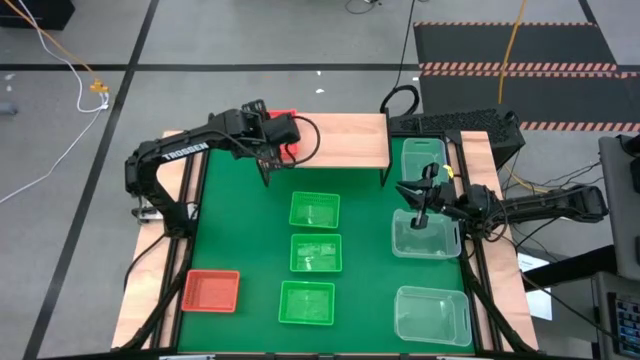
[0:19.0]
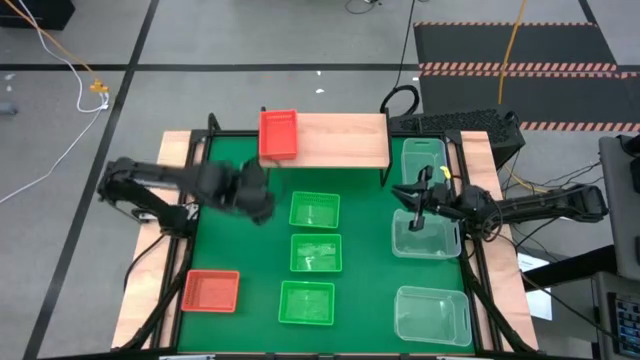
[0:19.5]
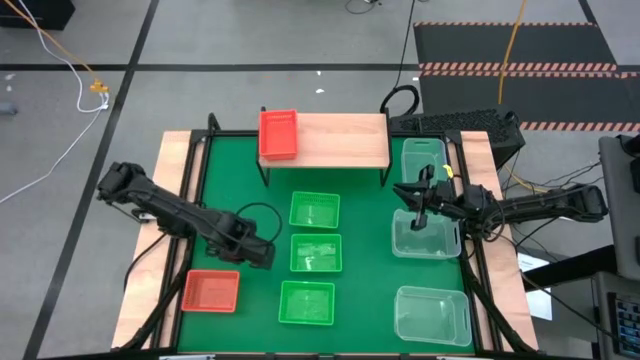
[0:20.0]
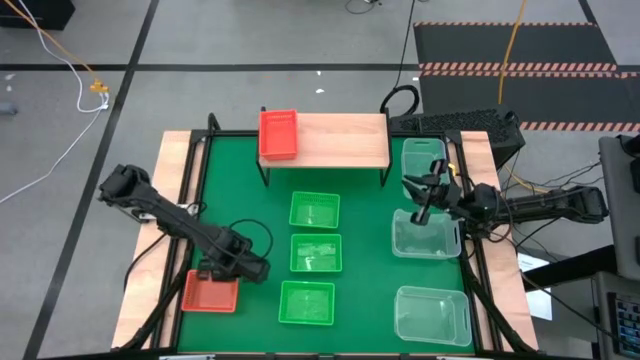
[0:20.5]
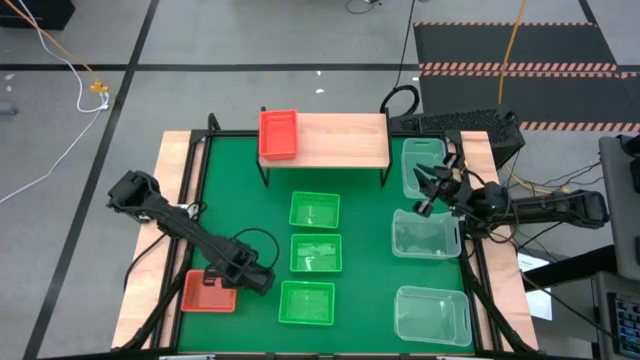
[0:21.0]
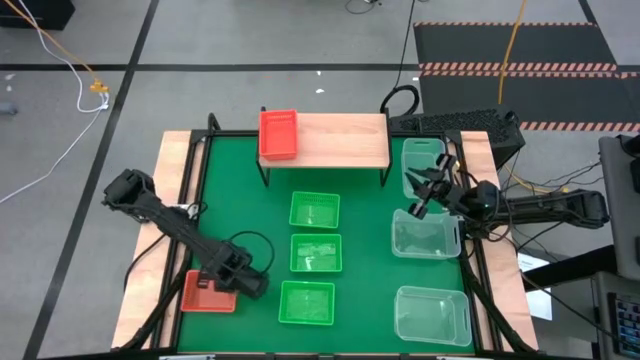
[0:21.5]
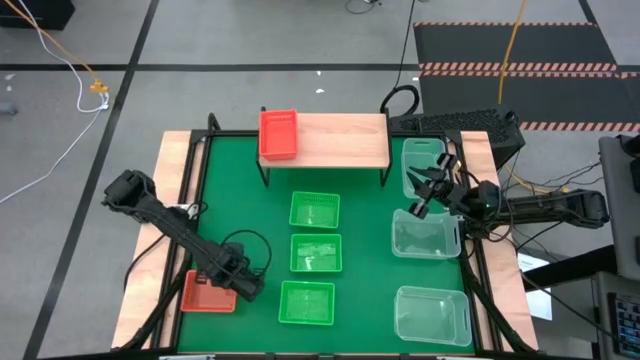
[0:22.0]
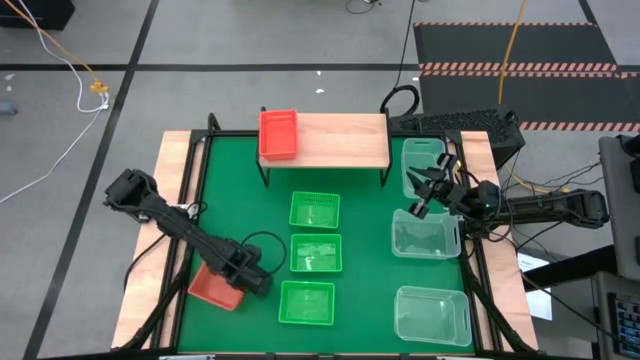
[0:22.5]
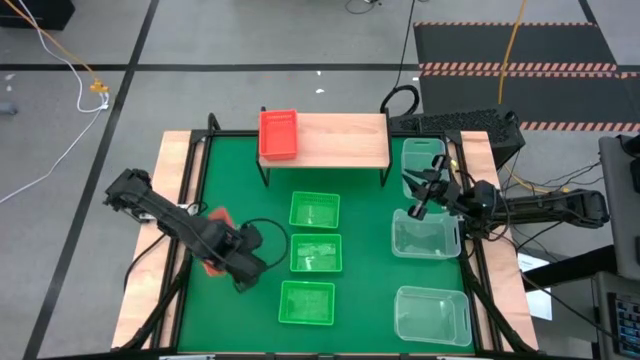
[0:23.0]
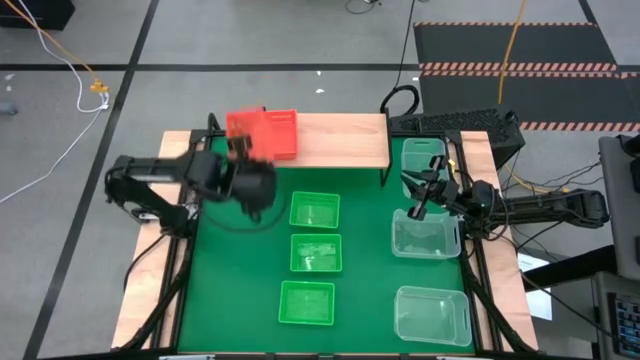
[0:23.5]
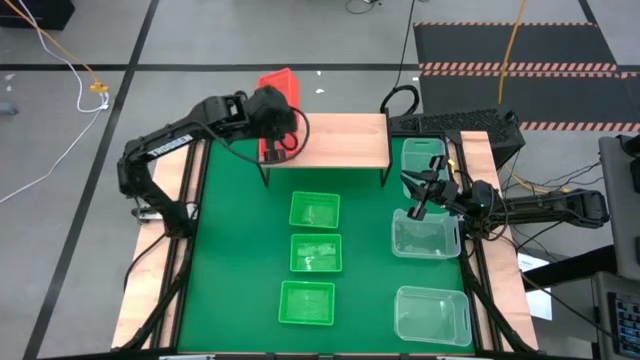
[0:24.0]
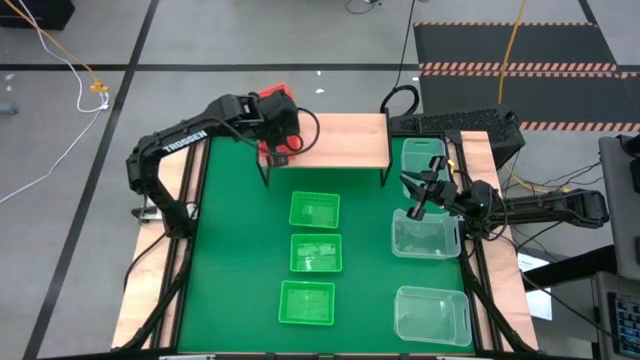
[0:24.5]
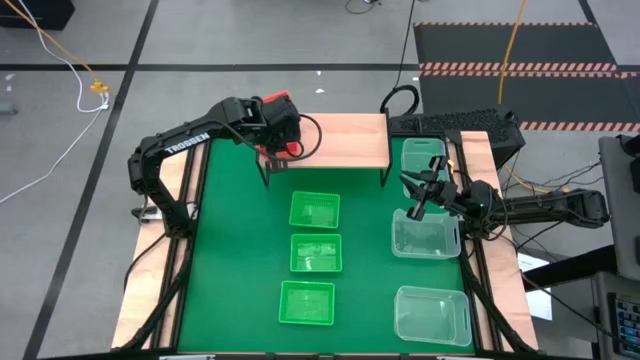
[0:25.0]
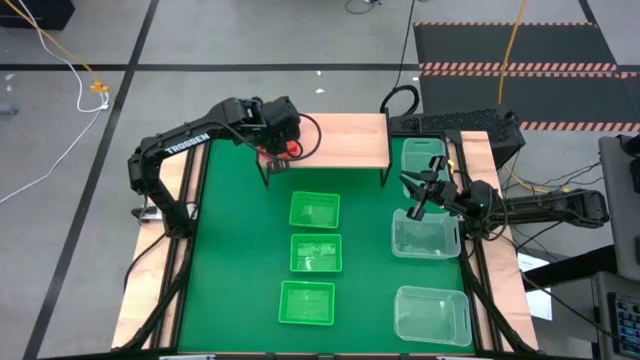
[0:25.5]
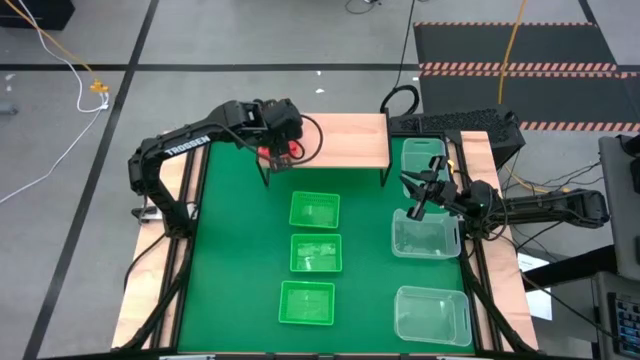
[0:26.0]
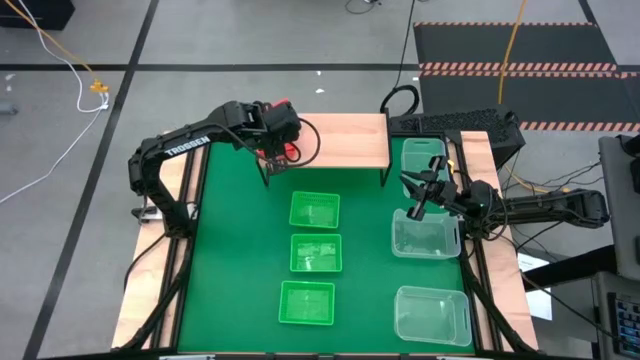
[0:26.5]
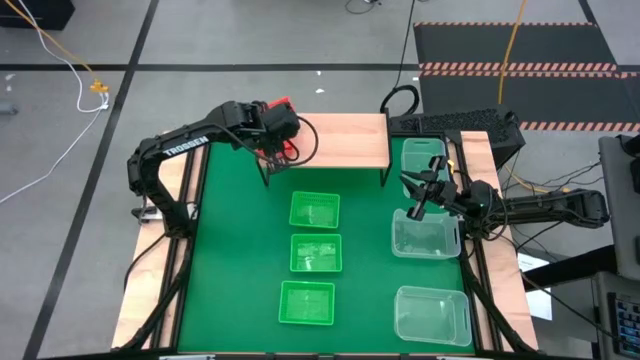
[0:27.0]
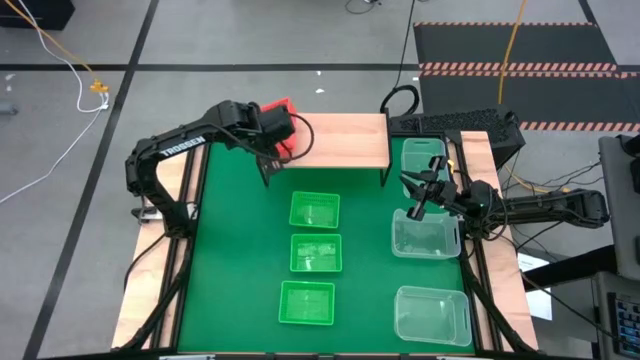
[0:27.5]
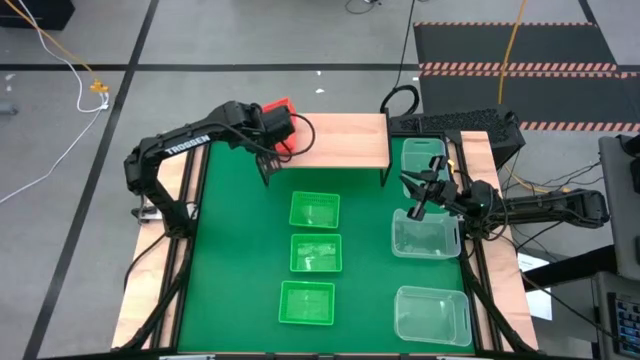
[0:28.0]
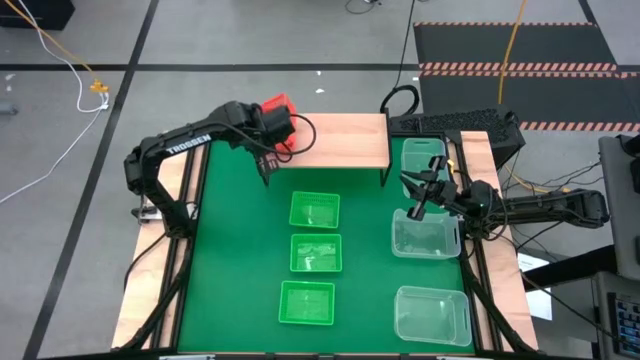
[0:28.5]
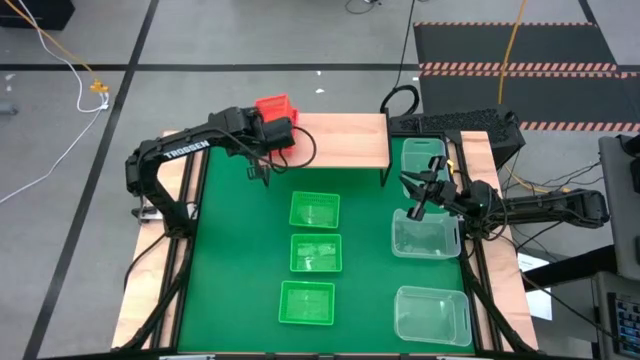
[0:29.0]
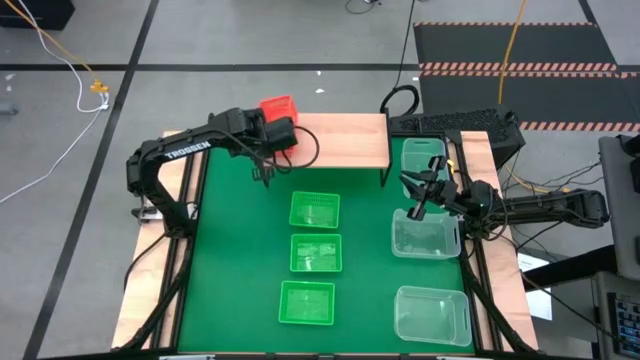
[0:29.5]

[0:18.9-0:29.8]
Task: Stack baskets on shelf by color
Stack the orange bin on the orange bin on the shelf

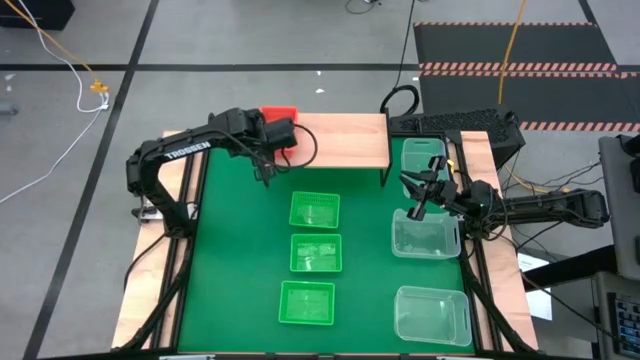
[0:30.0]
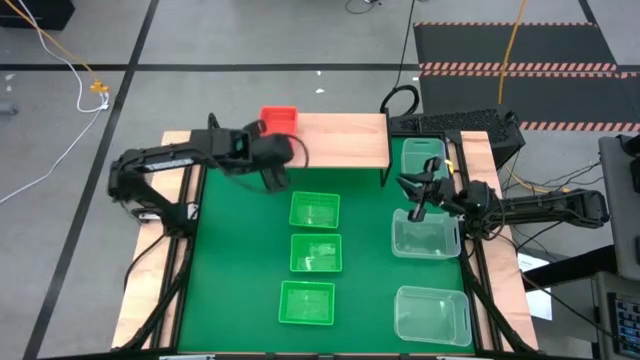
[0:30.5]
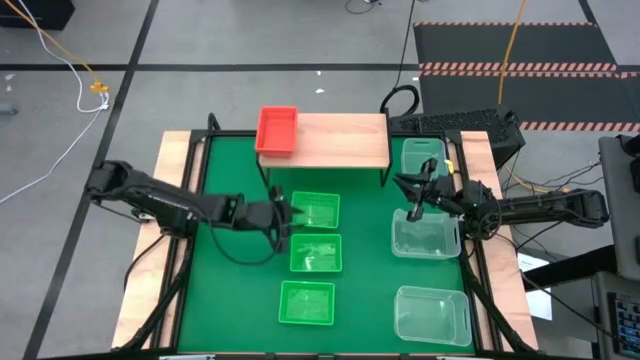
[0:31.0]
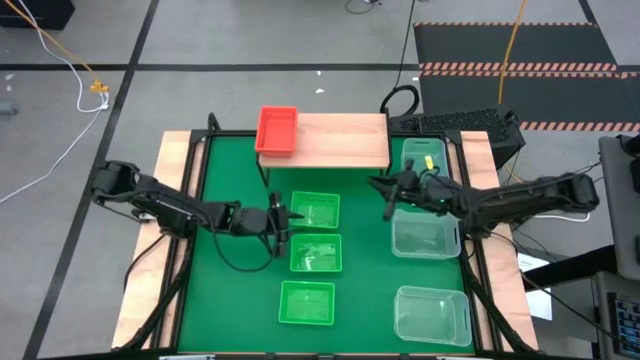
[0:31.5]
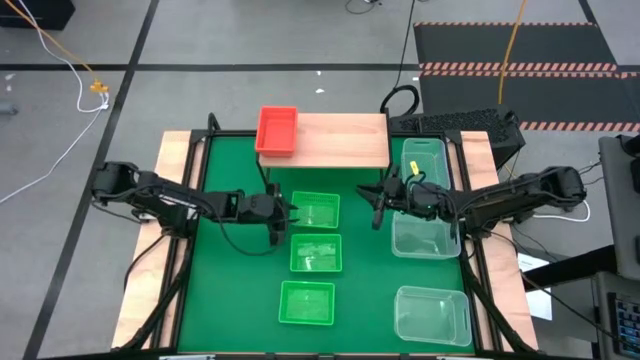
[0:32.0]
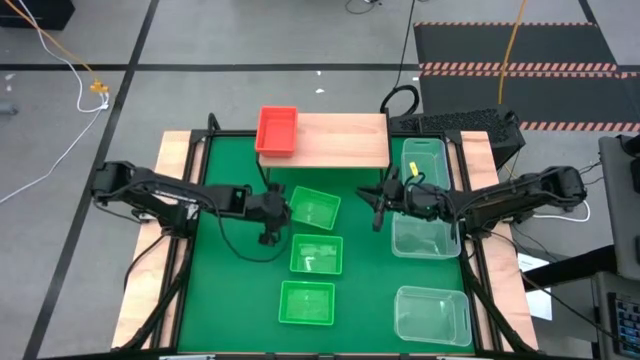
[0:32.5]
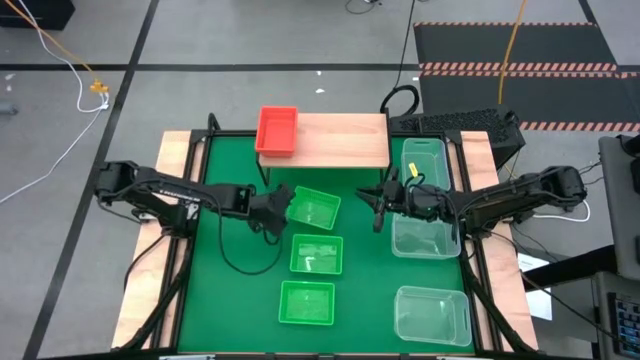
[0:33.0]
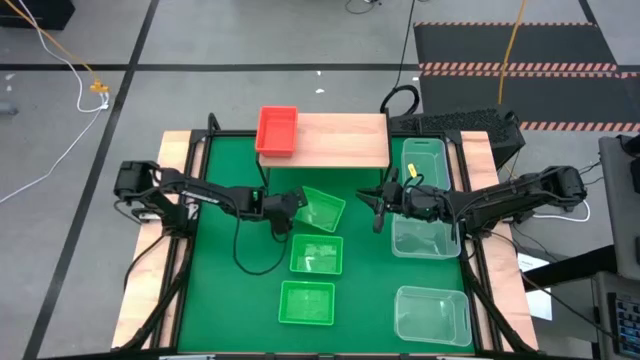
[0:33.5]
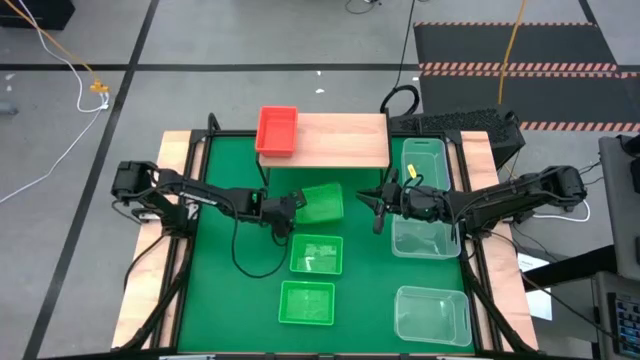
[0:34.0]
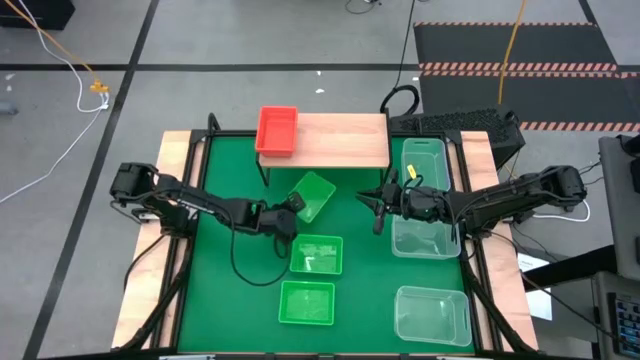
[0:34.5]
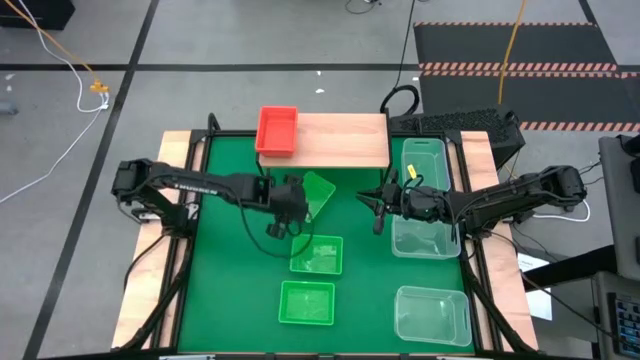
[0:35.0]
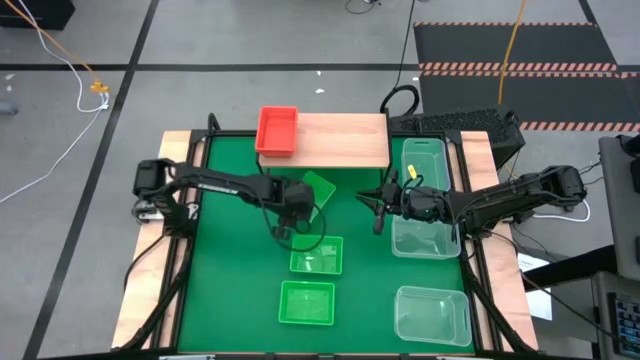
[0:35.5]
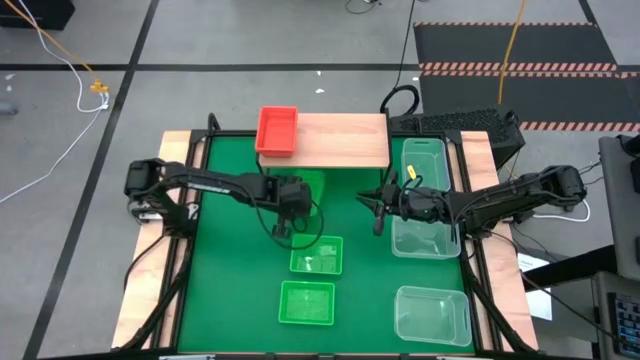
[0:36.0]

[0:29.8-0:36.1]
Put the top green bin on the shelf

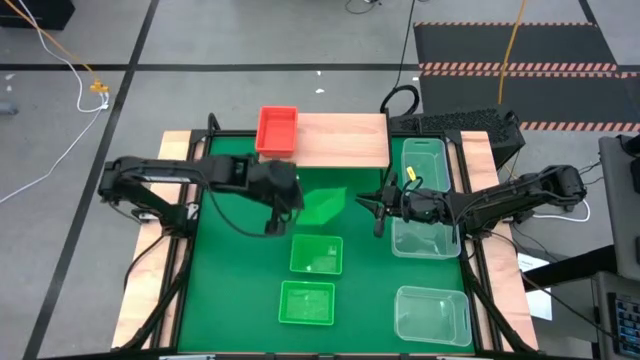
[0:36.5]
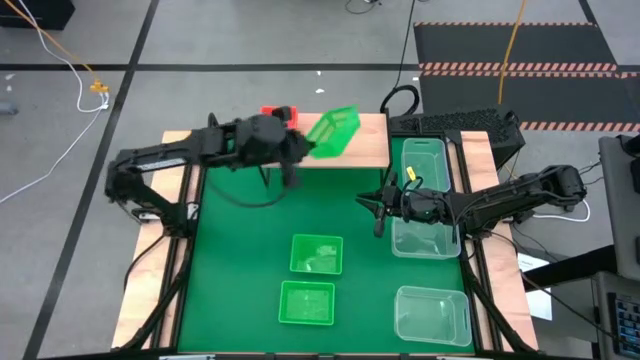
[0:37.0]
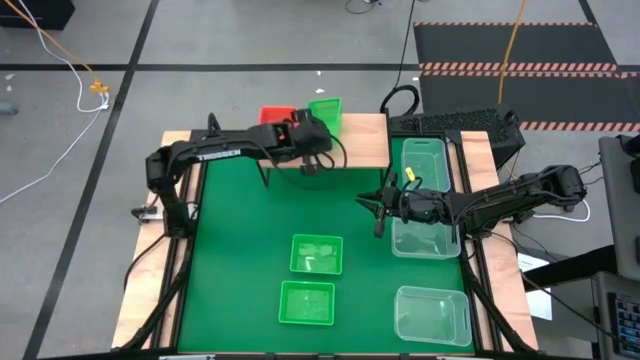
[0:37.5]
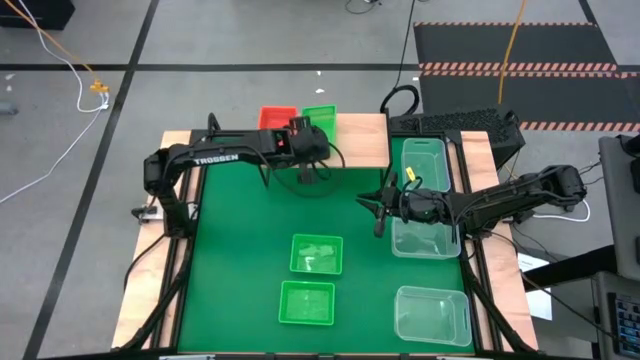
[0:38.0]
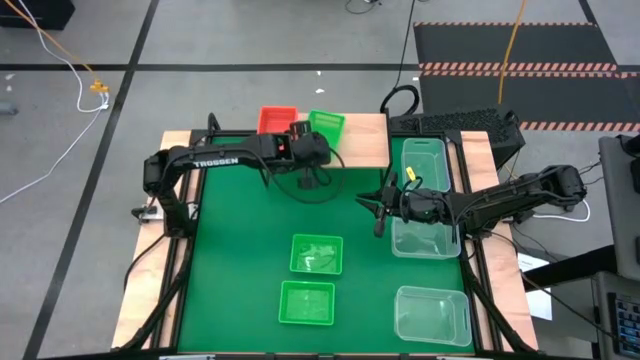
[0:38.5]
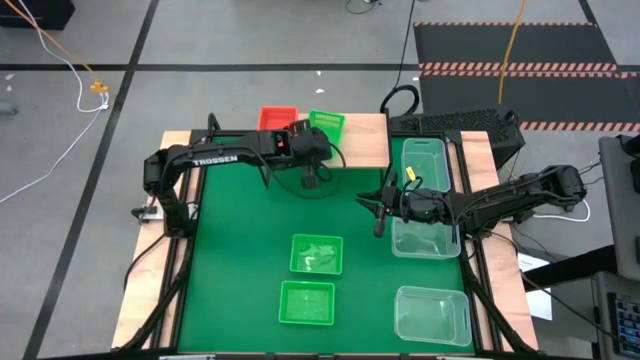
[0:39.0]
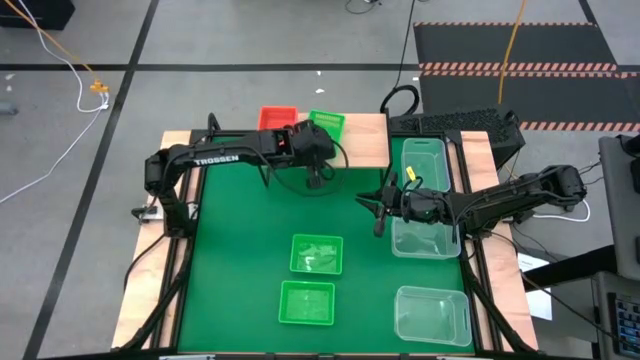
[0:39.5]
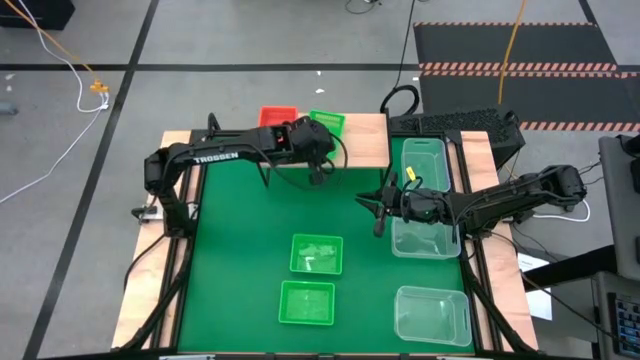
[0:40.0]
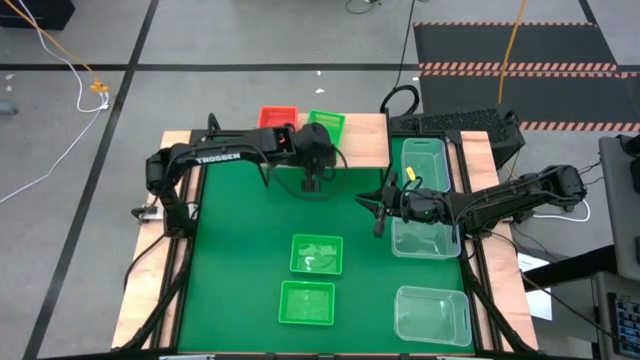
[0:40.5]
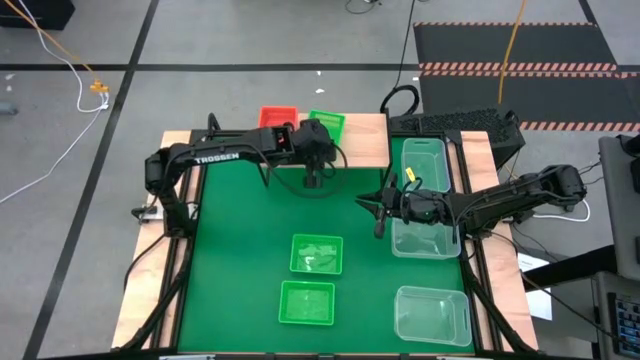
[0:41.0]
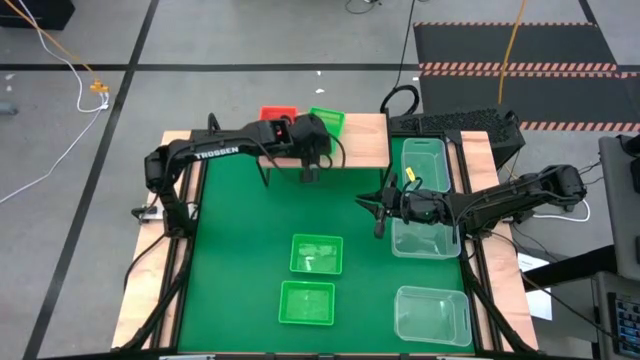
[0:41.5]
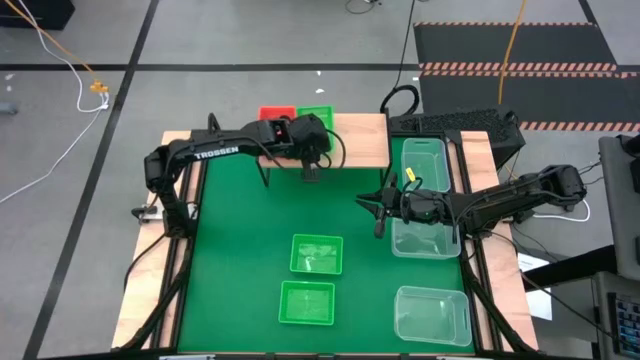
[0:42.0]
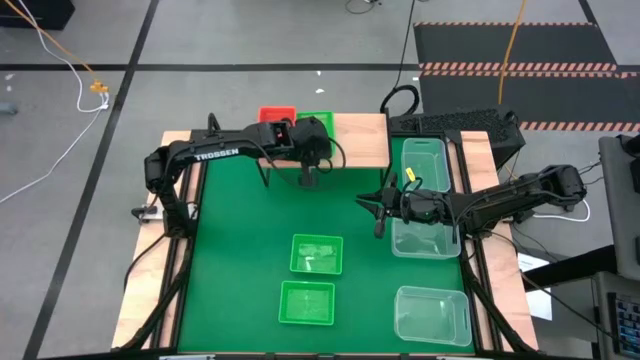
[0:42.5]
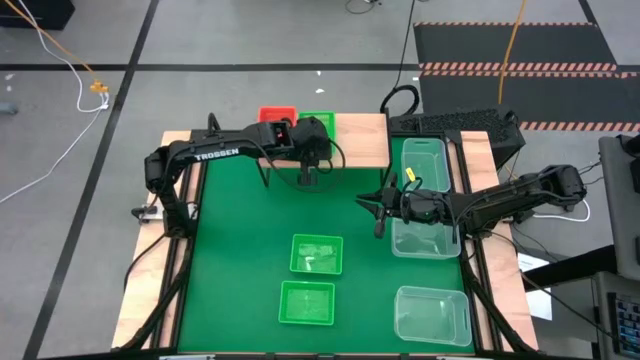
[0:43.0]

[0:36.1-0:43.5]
Put the top green bin on the shelf
